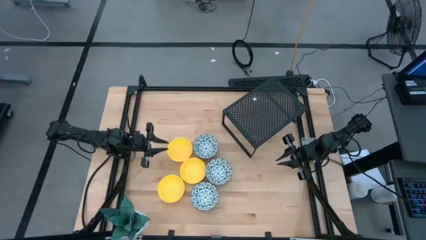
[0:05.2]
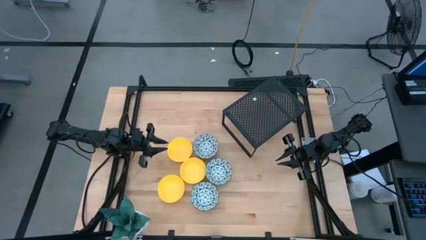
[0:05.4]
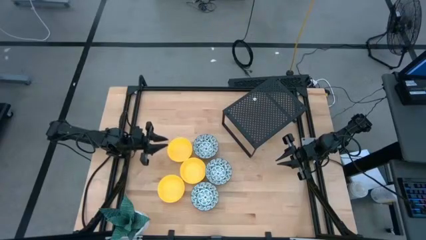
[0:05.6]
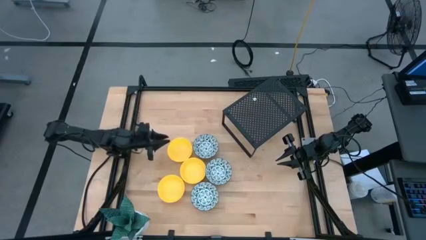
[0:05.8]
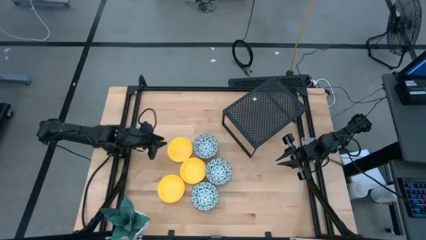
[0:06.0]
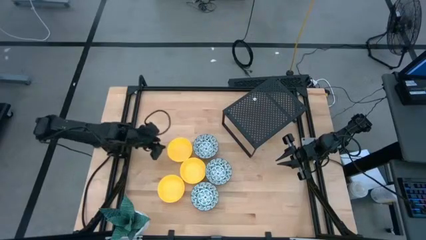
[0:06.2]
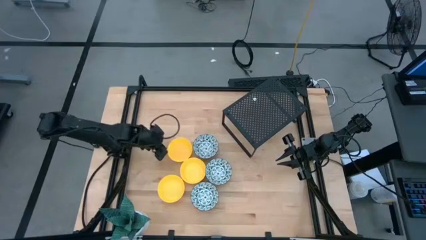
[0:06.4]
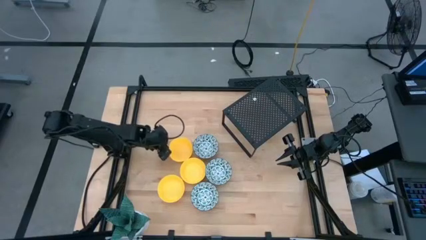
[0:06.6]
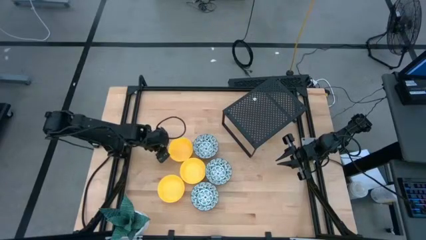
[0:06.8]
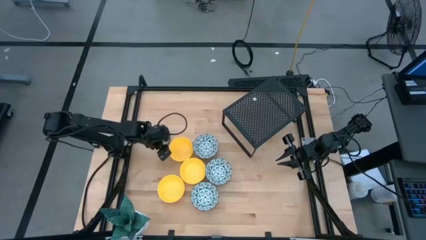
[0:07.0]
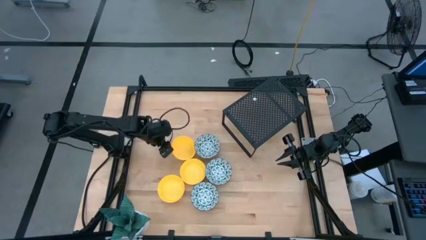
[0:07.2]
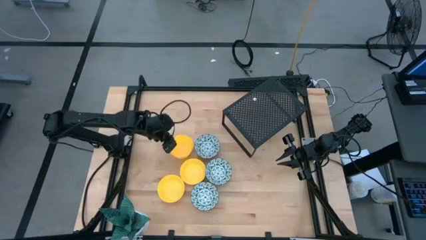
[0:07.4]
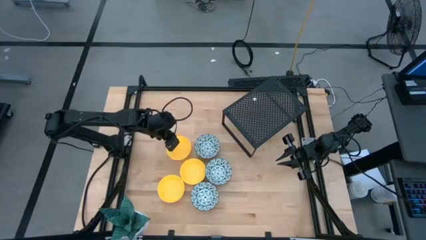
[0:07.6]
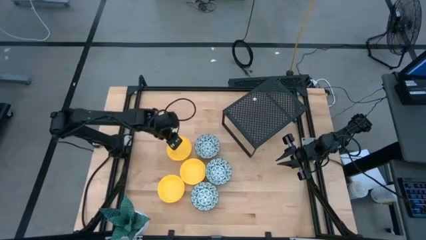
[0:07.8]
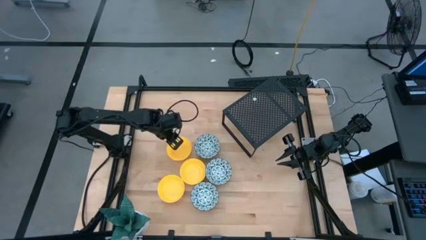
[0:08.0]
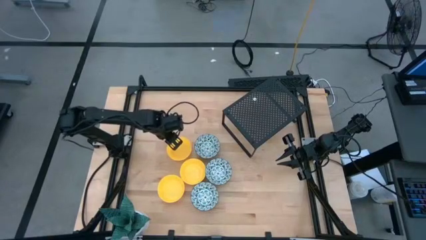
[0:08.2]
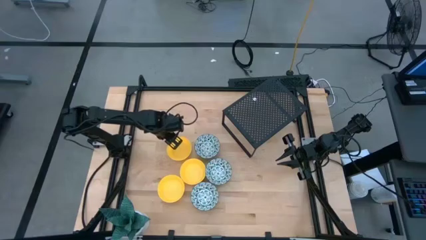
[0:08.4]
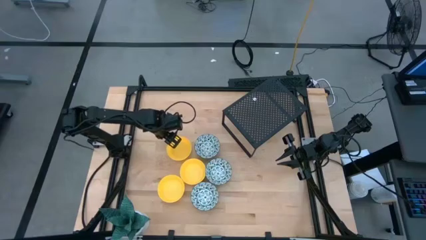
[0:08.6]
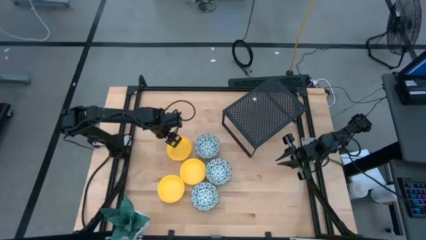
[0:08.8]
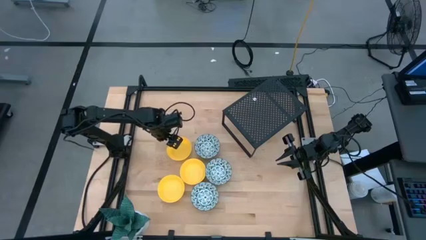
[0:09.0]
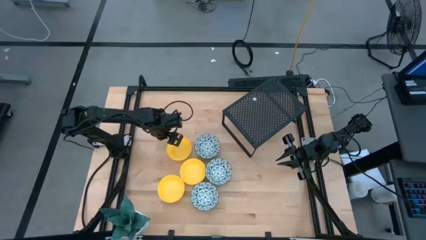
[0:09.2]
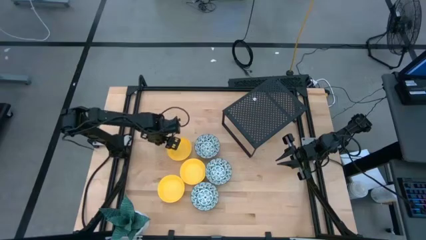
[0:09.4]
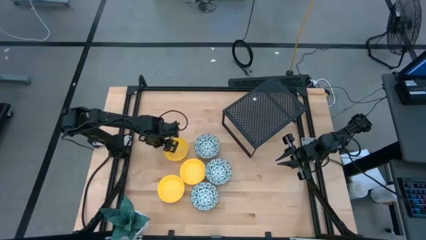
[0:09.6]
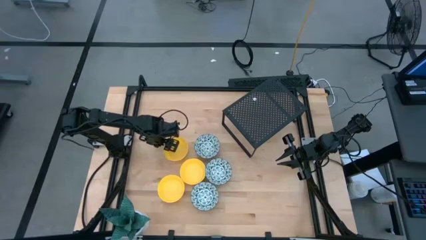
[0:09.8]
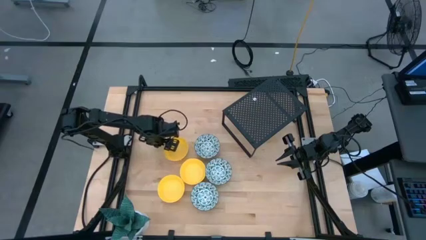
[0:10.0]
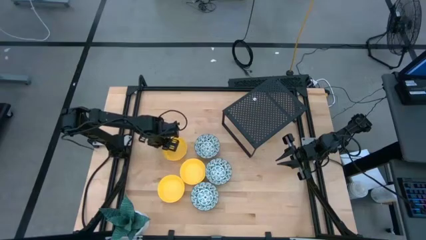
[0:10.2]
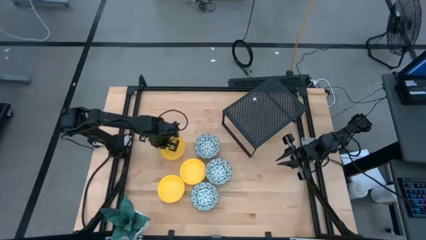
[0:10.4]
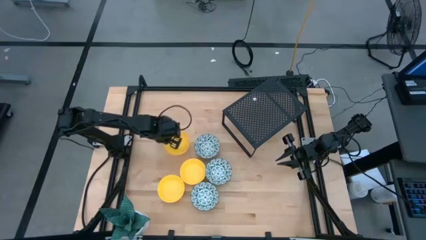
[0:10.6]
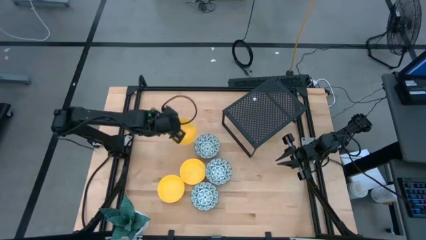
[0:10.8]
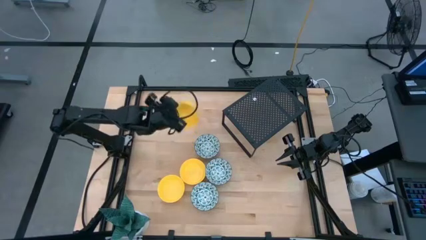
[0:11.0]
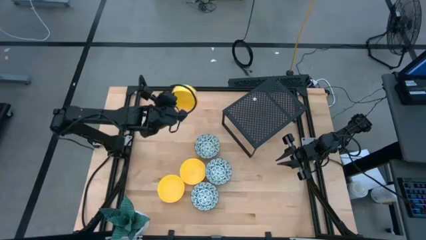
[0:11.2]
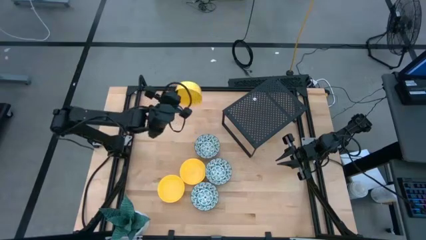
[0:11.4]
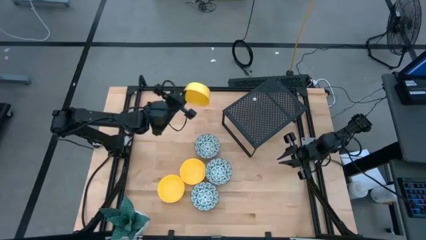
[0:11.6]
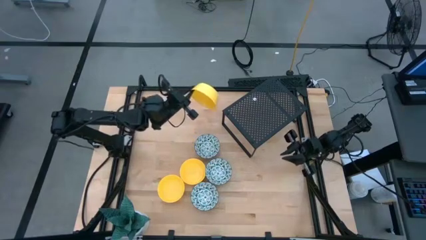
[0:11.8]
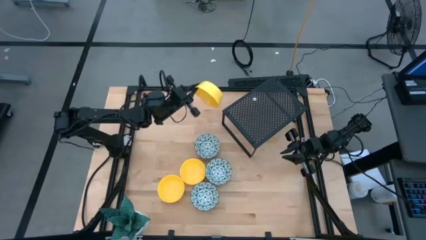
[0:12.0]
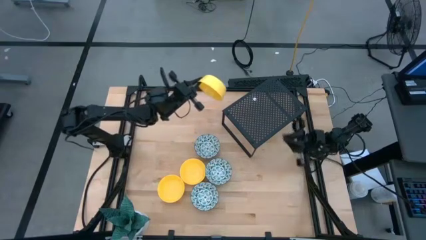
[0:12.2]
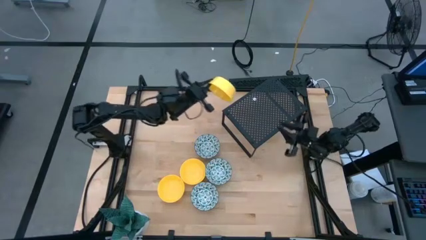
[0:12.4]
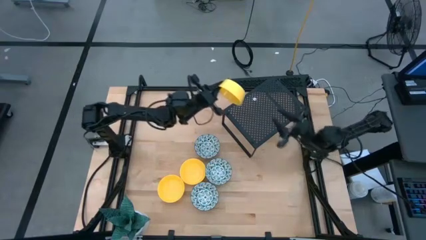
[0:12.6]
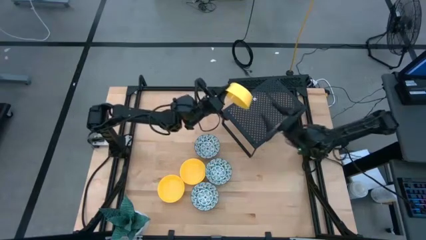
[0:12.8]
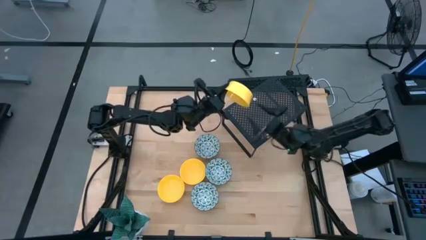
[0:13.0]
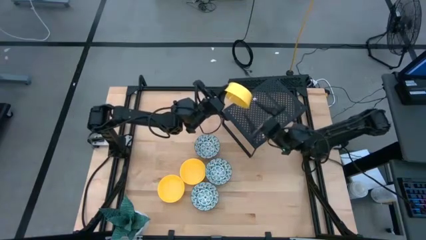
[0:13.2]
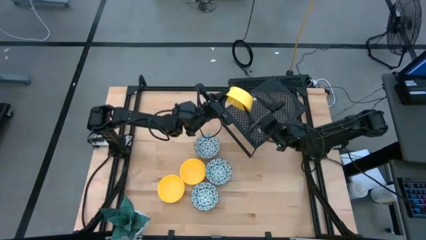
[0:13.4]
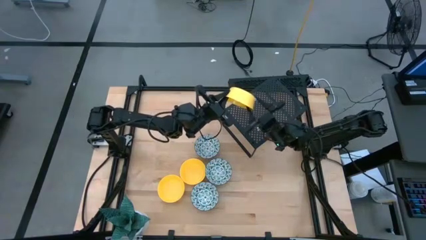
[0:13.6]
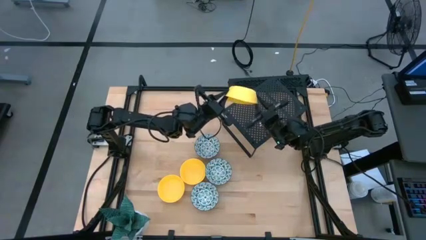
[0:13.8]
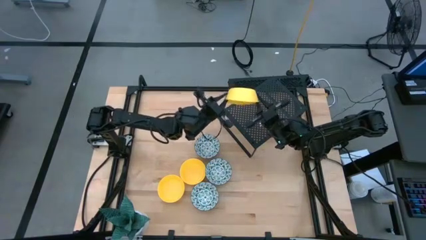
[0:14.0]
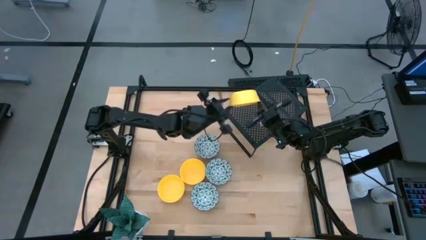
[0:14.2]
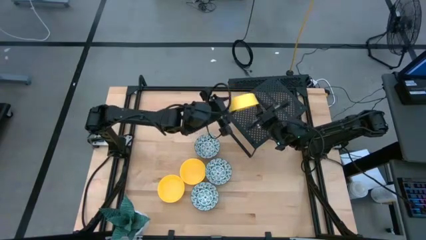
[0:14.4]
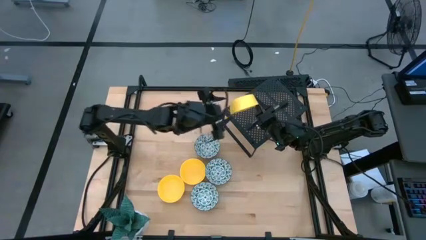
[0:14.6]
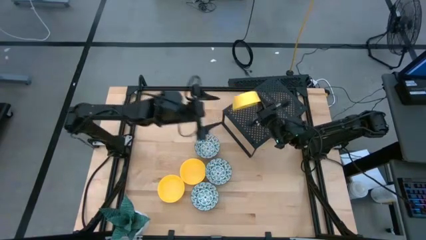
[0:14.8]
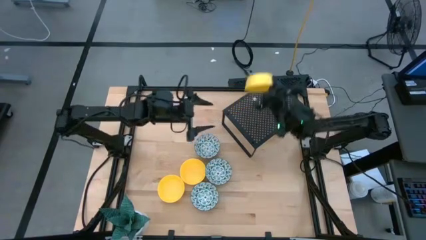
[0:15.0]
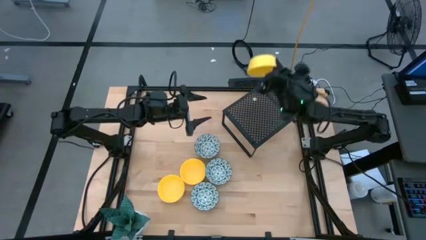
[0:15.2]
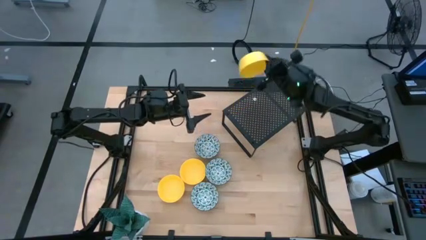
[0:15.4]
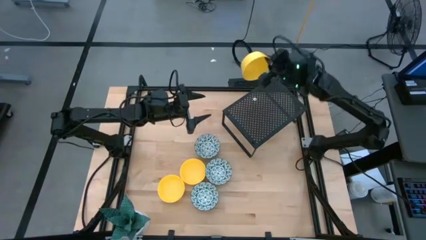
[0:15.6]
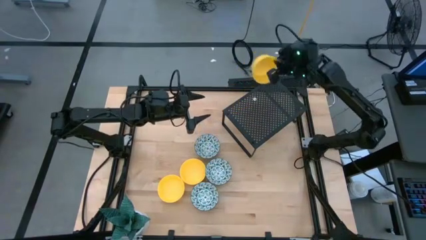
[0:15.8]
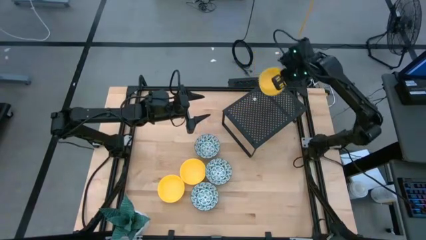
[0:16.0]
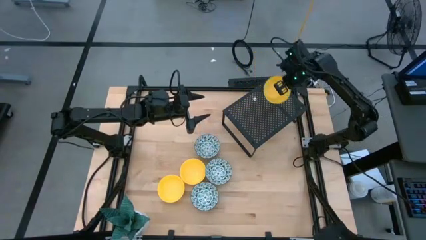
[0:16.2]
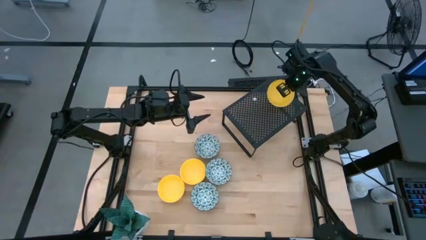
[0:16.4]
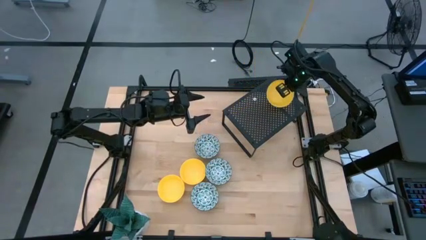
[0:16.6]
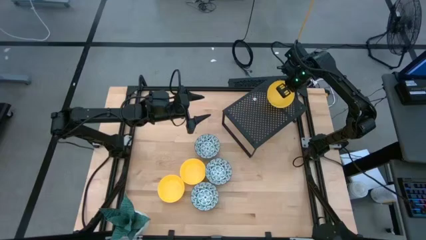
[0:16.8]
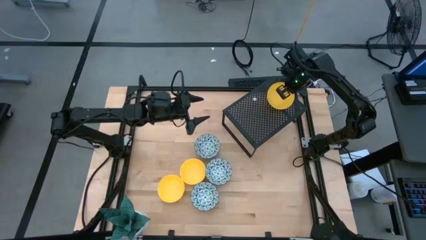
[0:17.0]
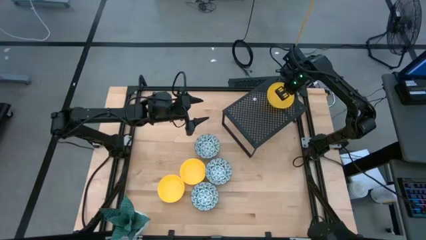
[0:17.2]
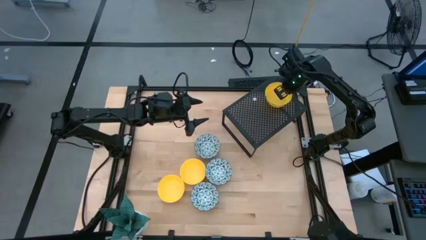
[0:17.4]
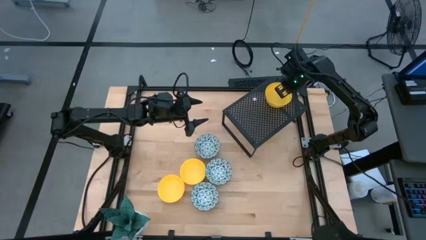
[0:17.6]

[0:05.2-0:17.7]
Task: Pick & Place Mini bowls
Put the top yellow bowl on the shelf

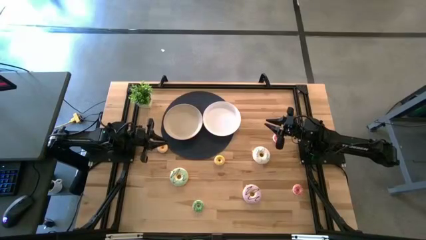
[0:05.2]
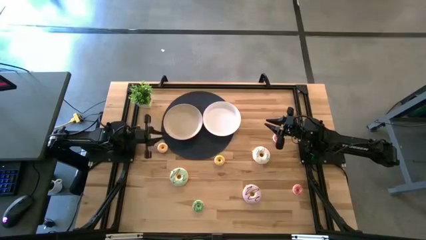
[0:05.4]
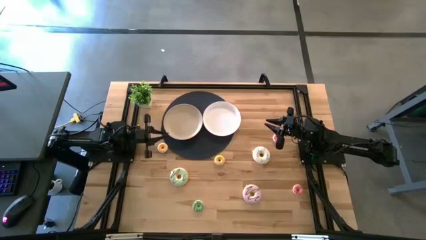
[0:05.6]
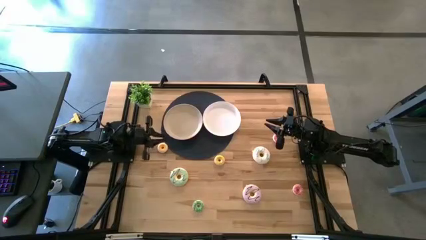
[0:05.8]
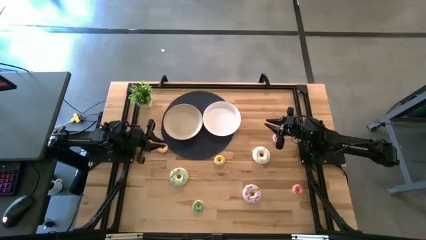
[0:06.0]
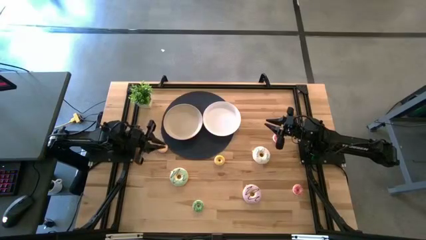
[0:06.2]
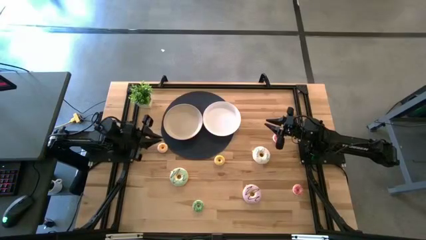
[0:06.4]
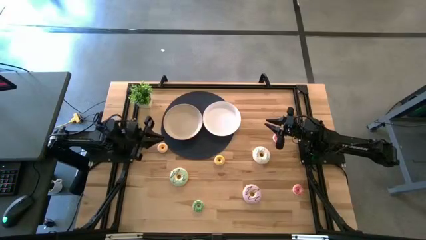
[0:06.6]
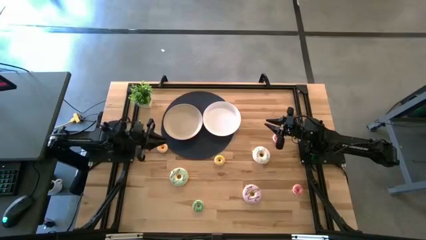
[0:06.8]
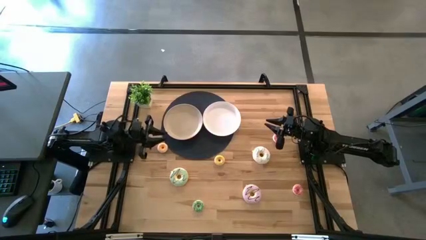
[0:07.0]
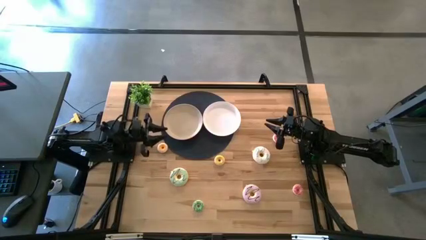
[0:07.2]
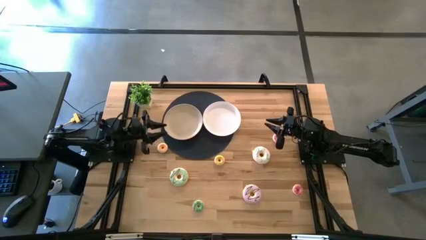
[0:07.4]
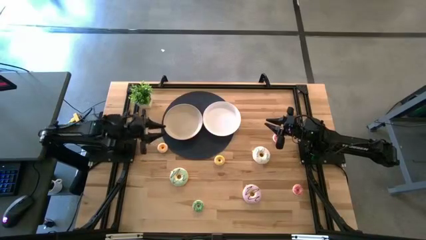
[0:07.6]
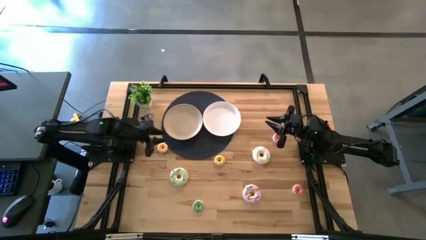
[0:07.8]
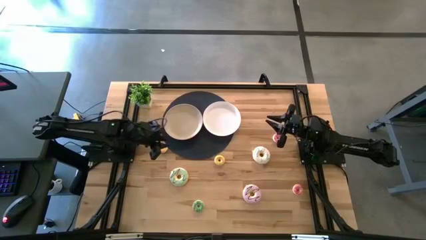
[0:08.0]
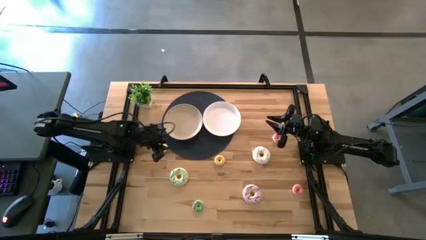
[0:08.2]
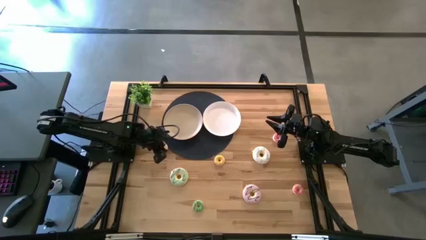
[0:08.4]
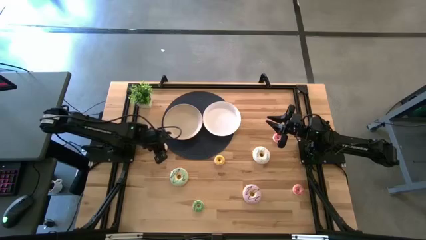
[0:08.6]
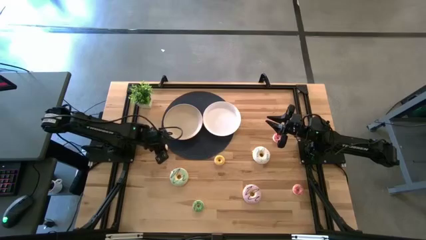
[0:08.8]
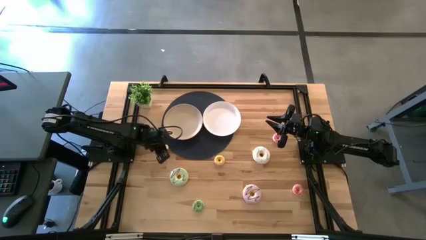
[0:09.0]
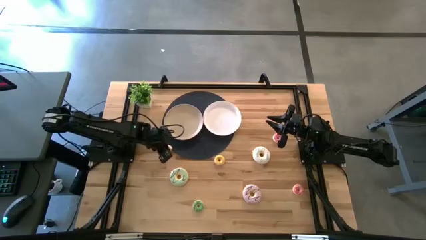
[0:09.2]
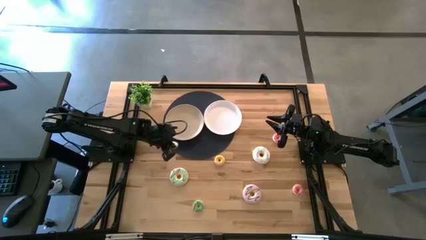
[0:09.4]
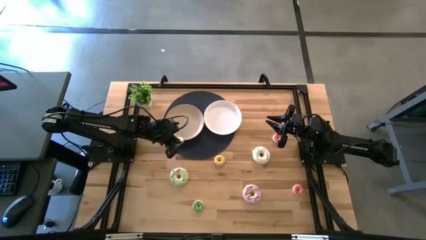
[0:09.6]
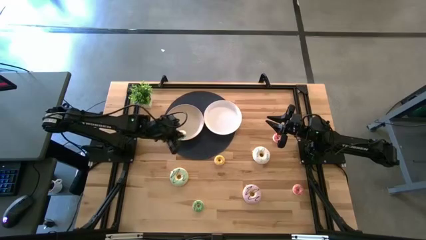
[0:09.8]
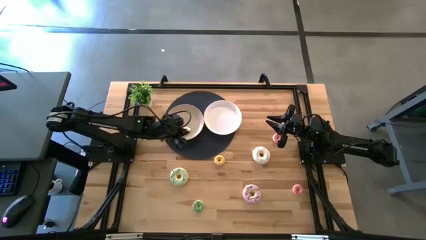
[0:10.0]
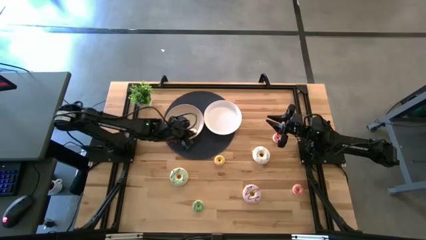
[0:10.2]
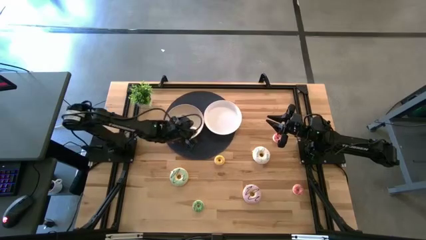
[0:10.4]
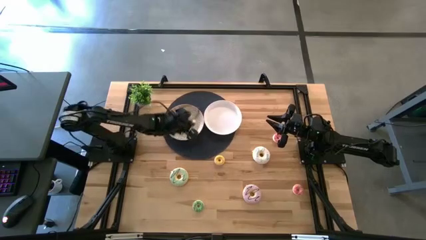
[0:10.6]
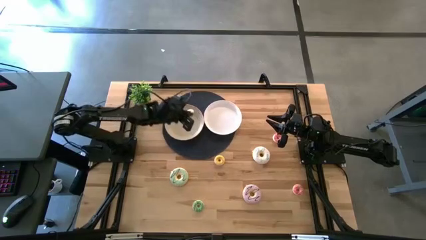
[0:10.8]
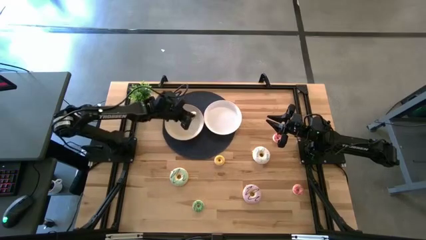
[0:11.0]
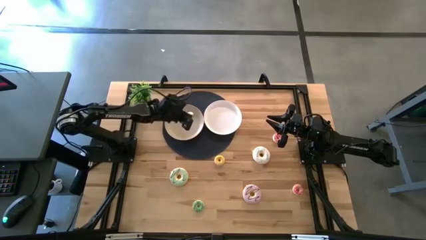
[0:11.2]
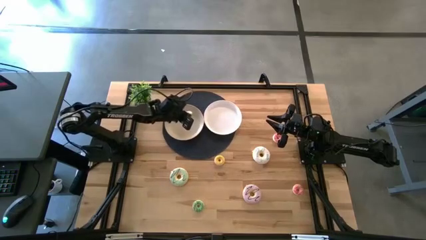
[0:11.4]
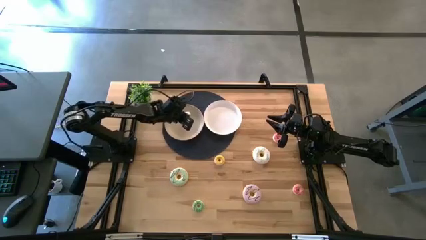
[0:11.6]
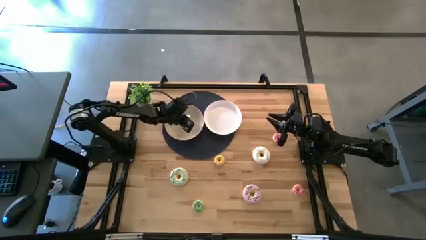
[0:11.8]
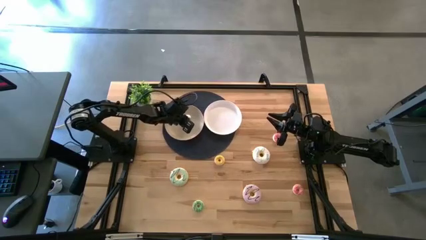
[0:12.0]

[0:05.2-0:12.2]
Task: Pick & Place donuts
Put the top small green donut on the gray plate
